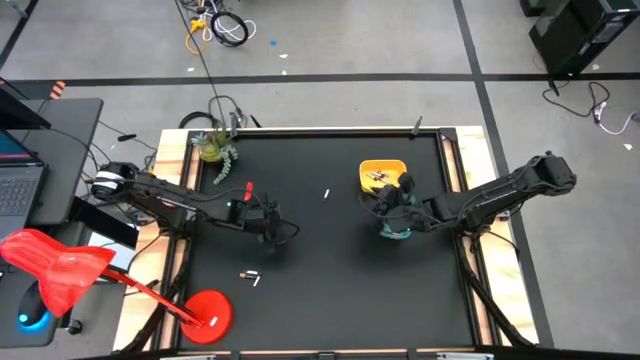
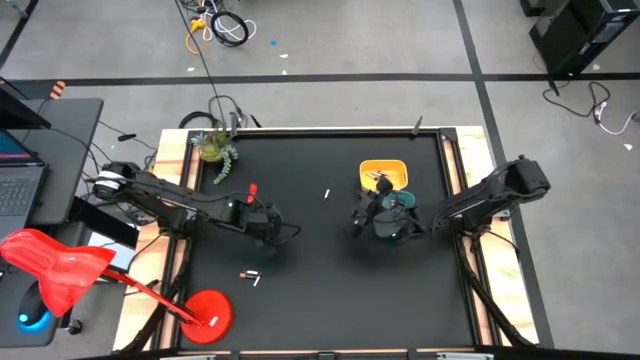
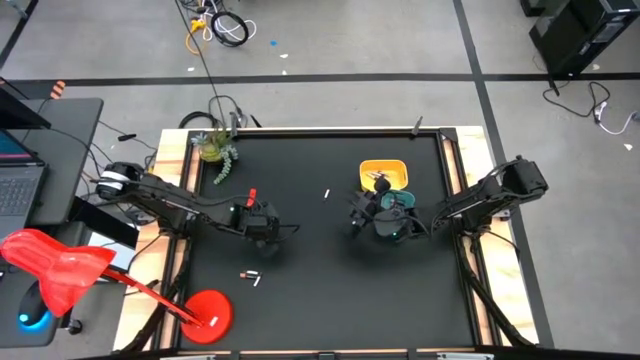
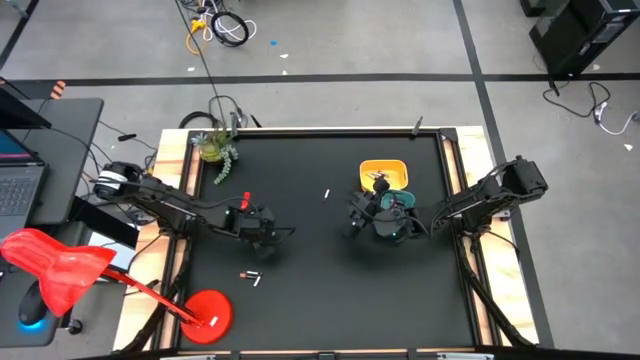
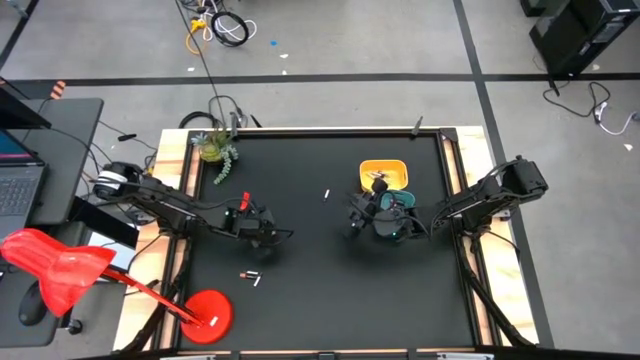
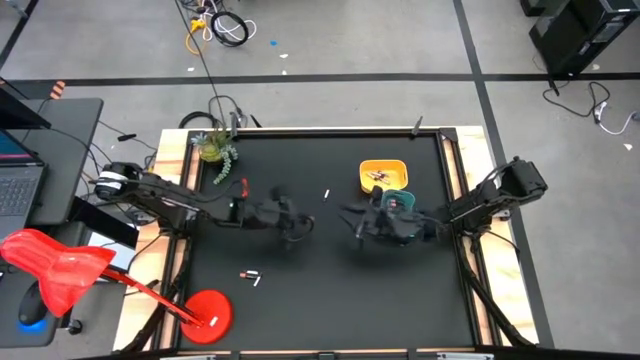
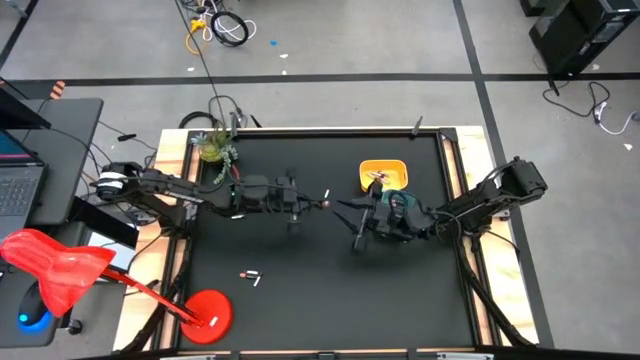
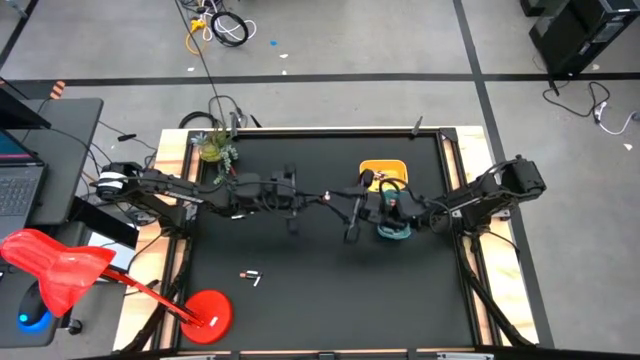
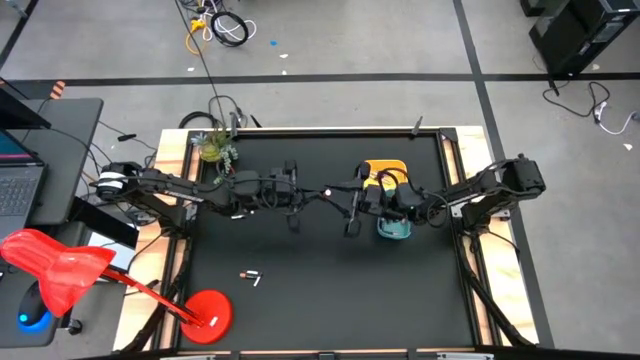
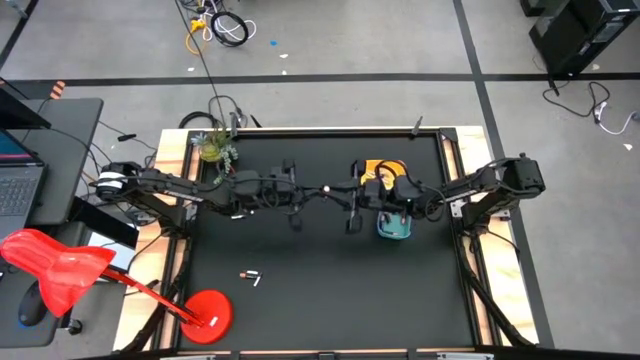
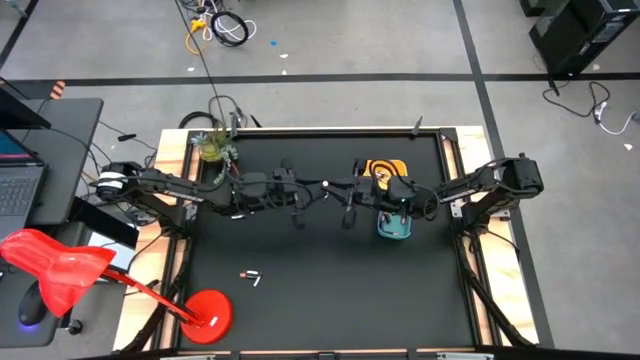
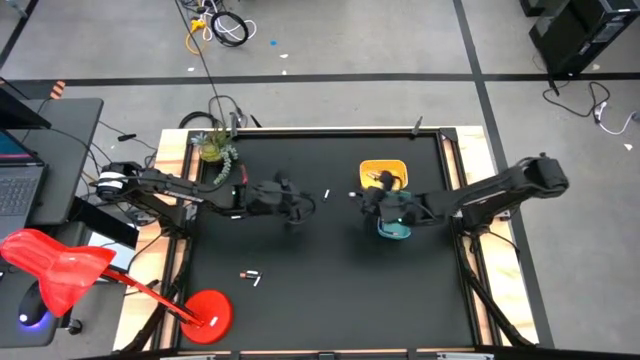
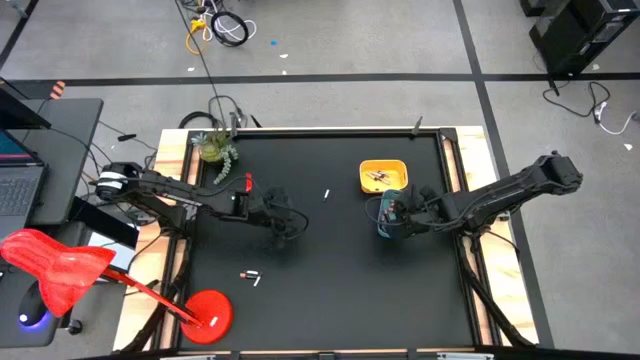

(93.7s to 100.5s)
Task: Sort batteries
Put the middle gold black battery into the blue bin

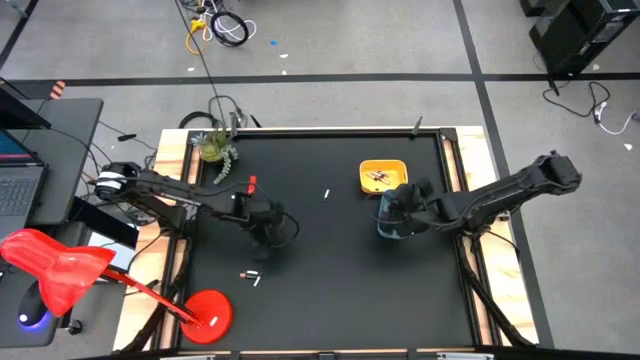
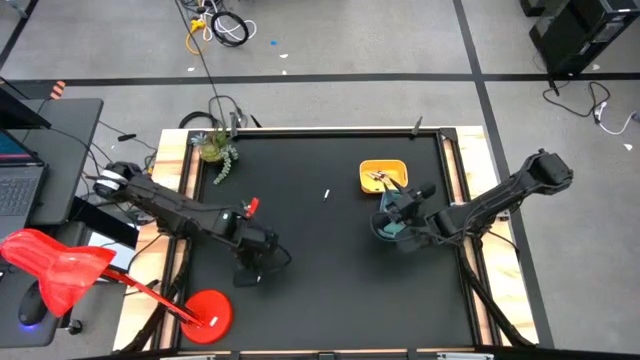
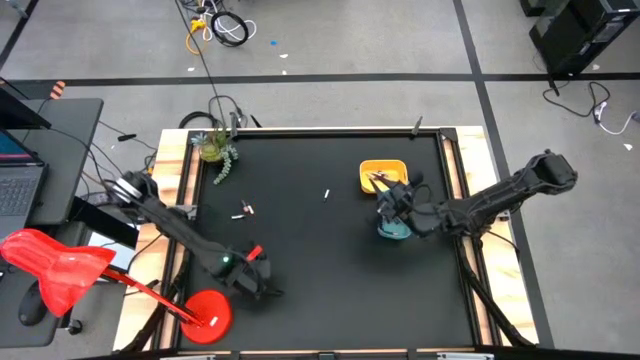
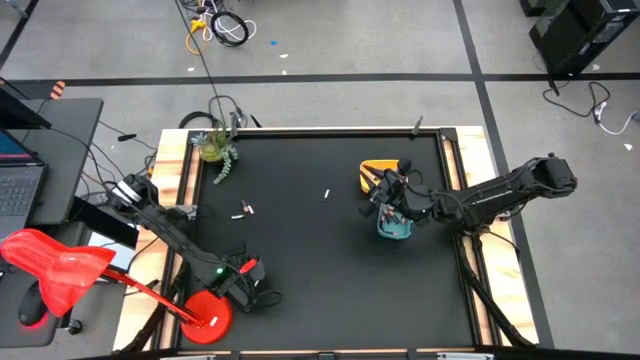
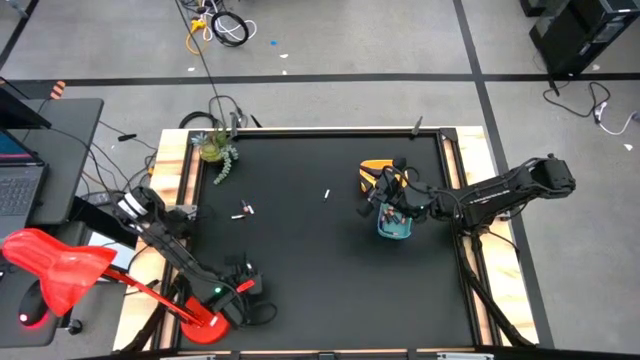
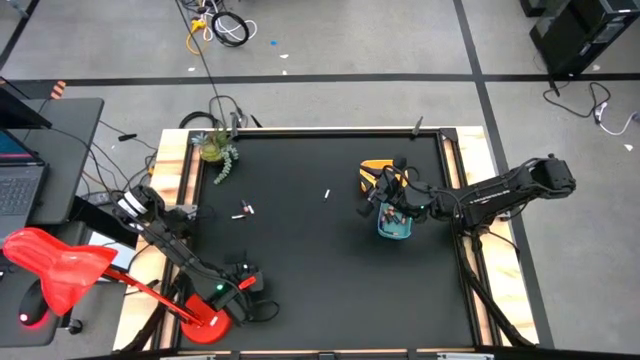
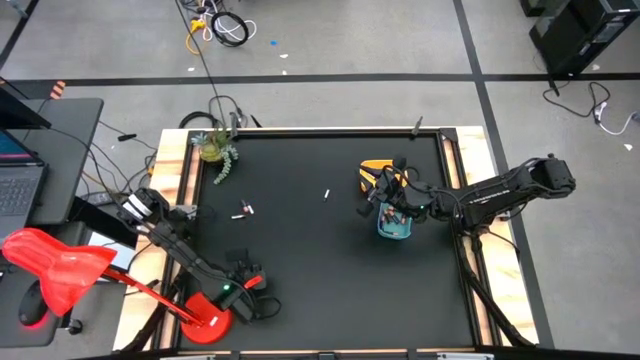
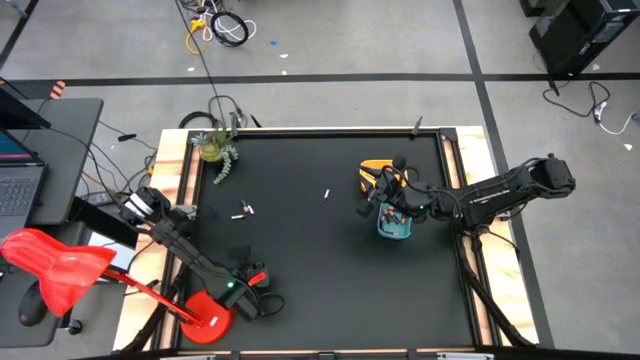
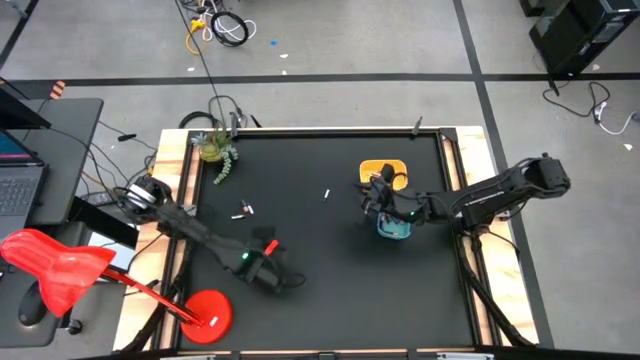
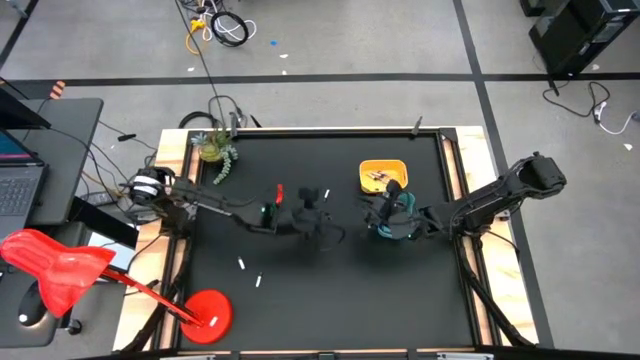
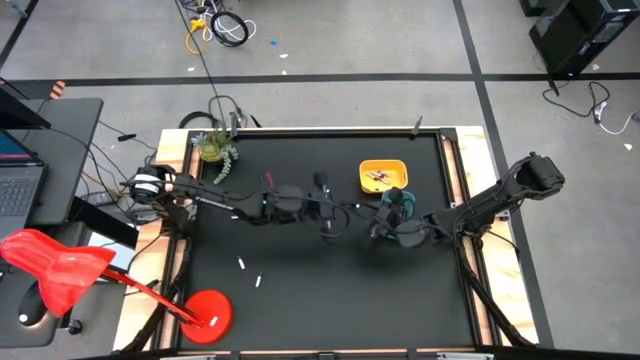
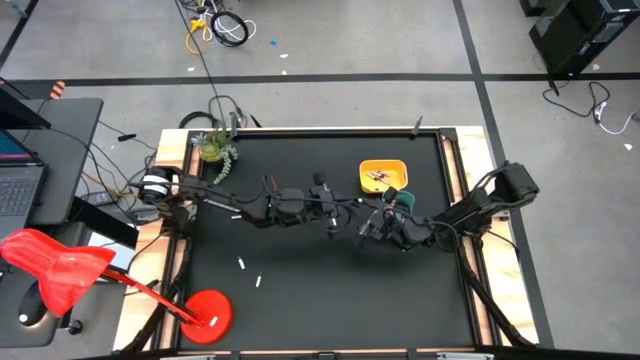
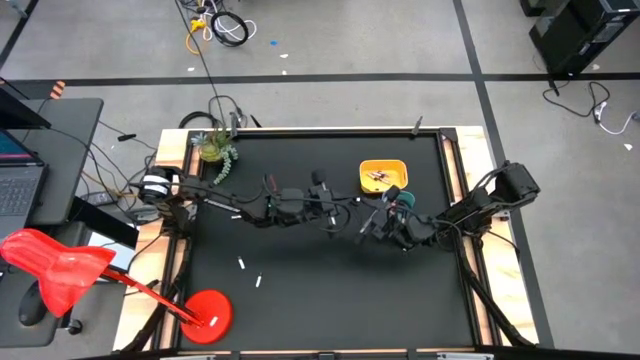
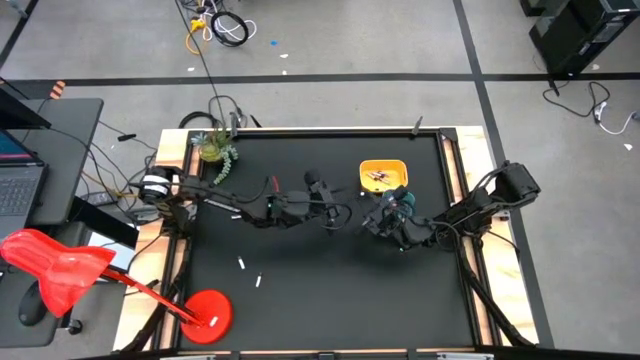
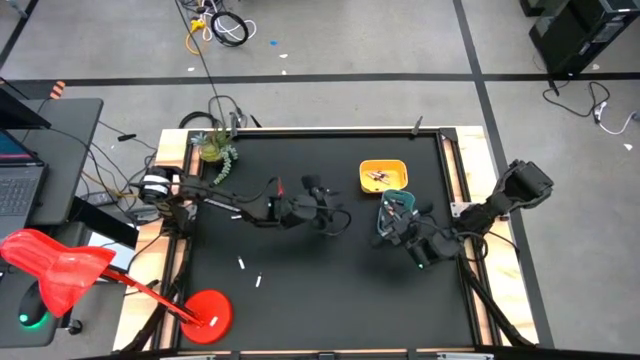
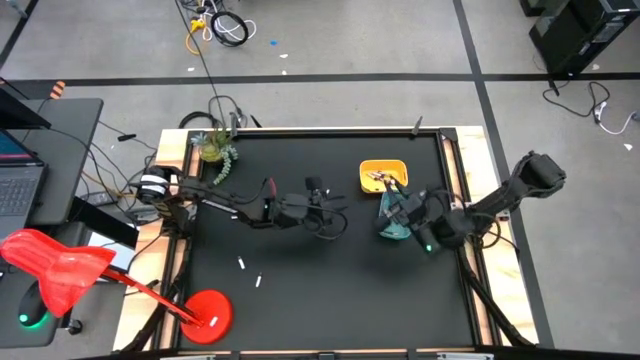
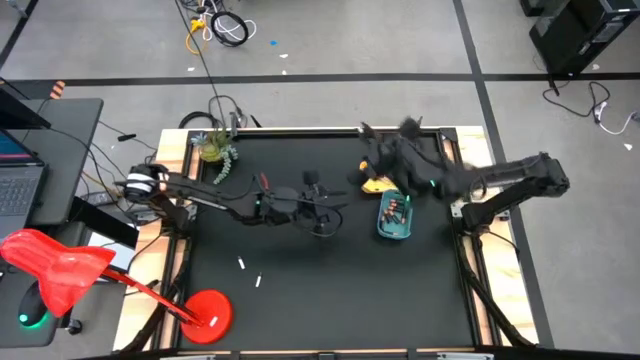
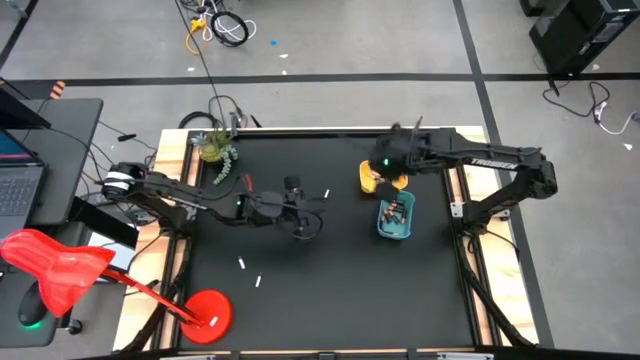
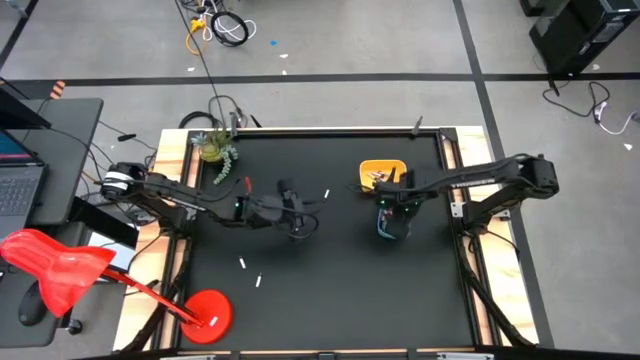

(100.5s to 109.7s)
Put the bottom gold black battery into the blue bin

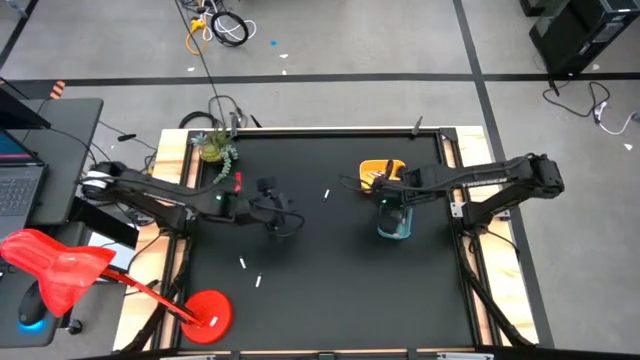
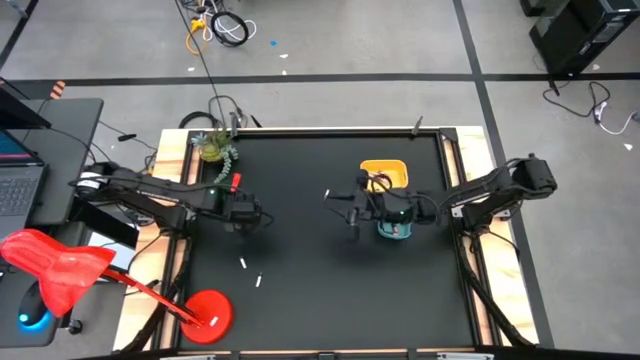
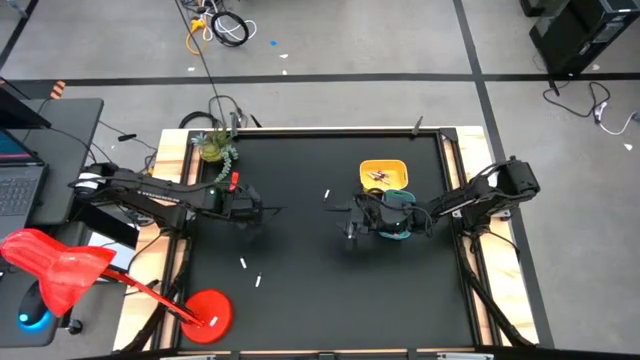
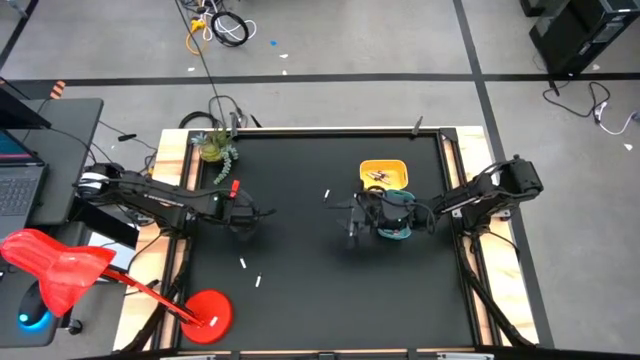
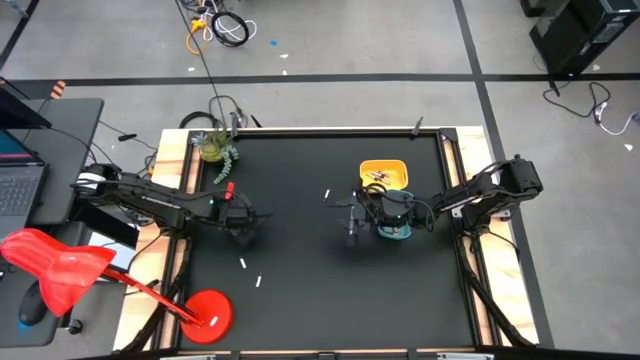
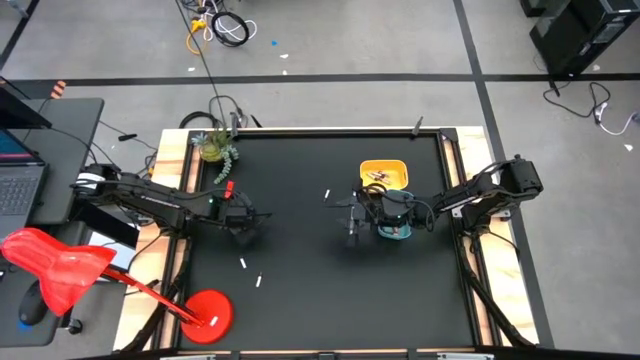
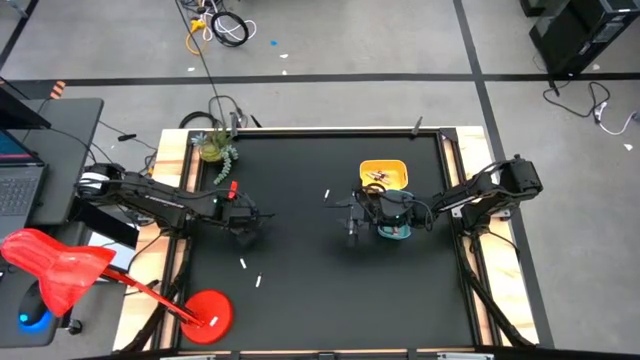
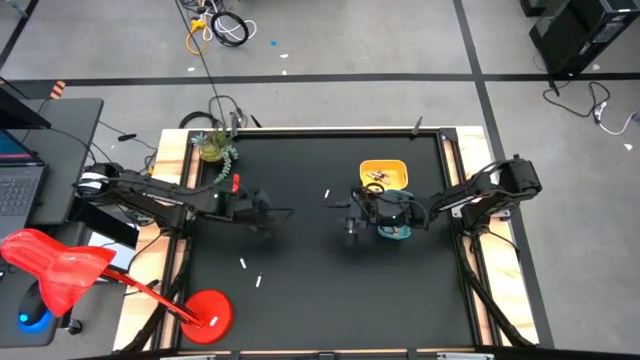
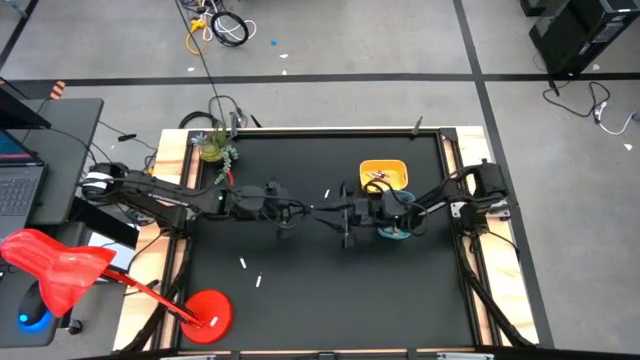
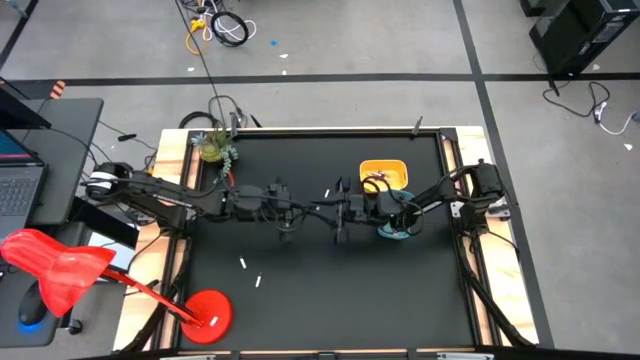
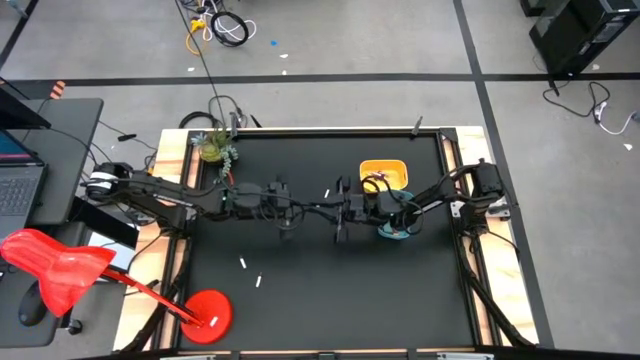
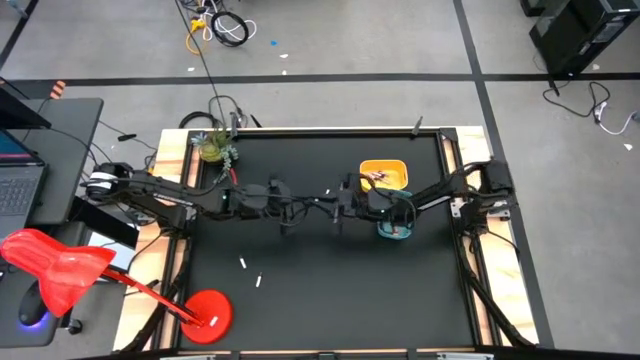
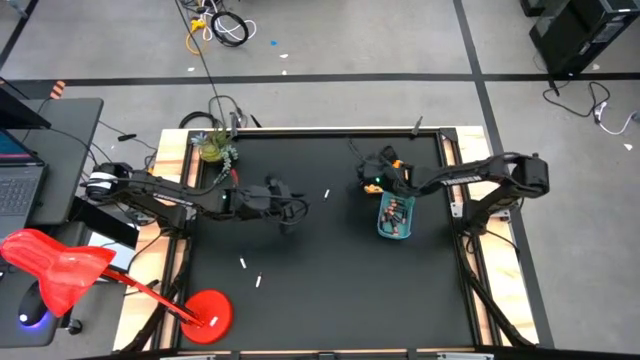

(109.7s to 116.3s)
Put the silver black battery into the yellow bin
